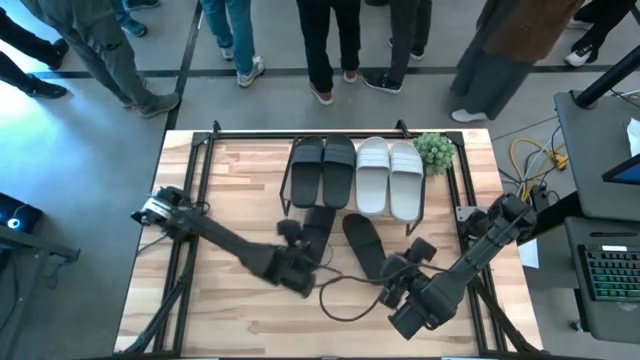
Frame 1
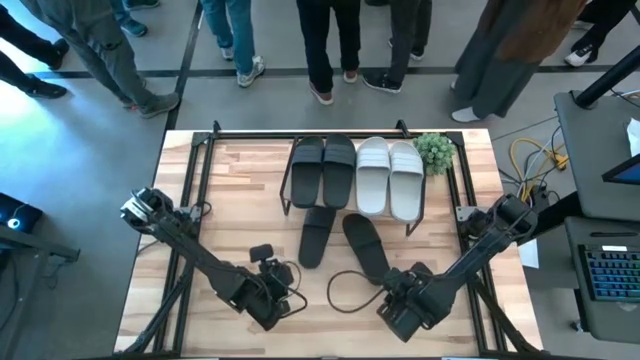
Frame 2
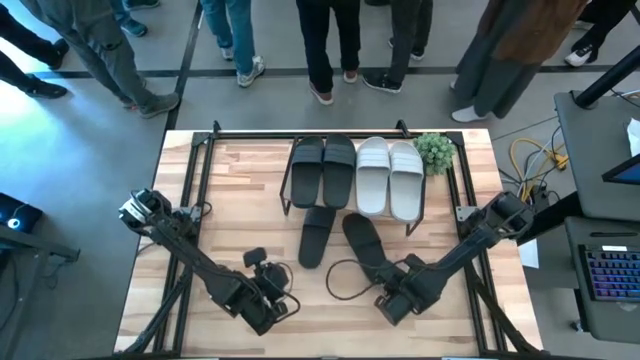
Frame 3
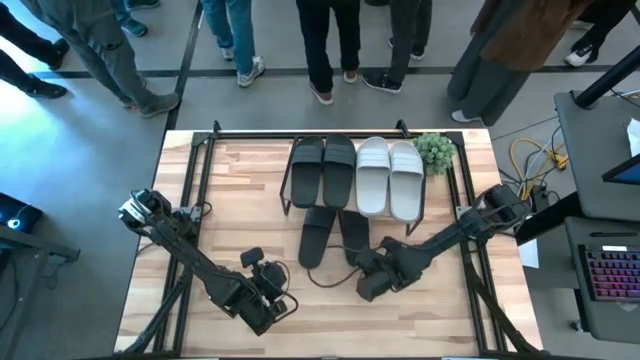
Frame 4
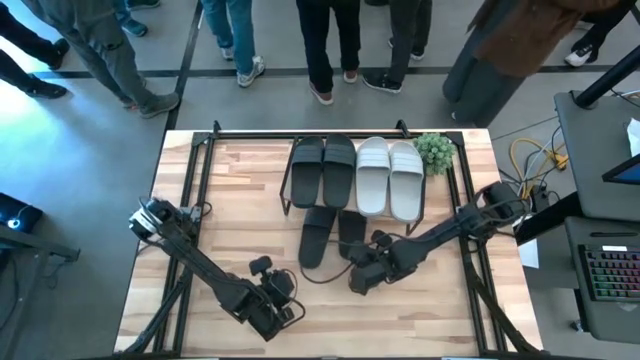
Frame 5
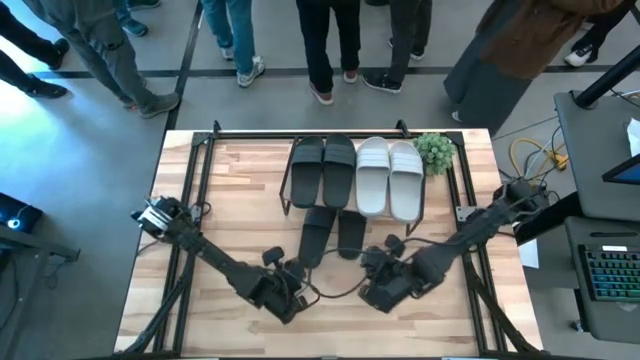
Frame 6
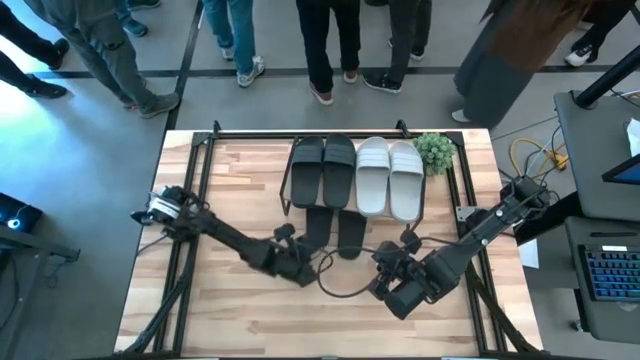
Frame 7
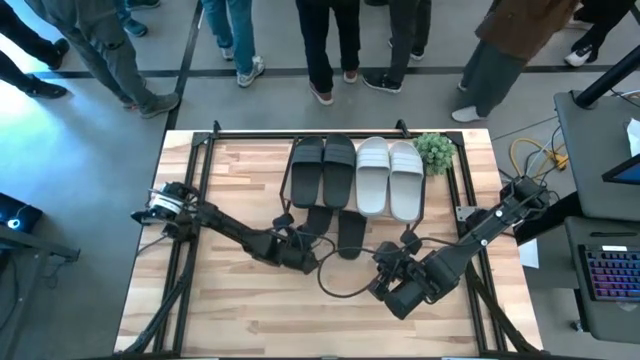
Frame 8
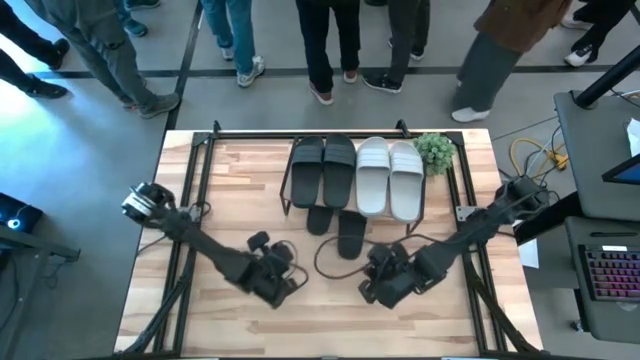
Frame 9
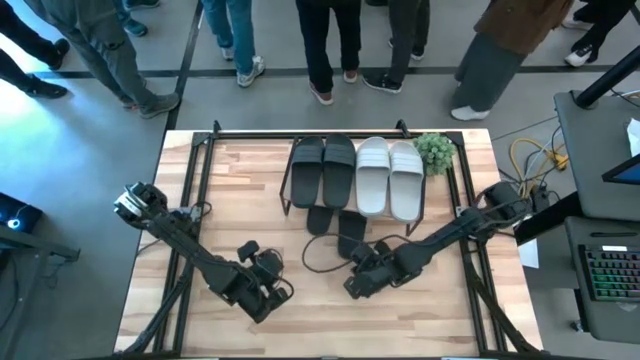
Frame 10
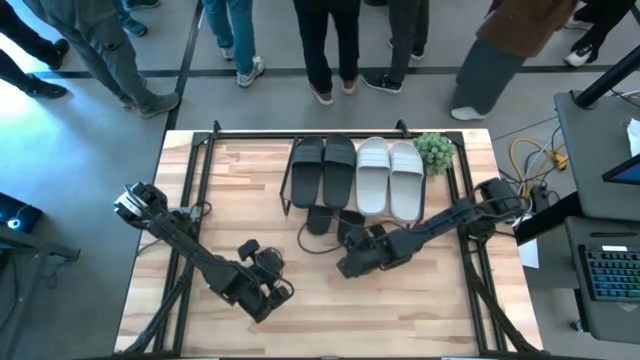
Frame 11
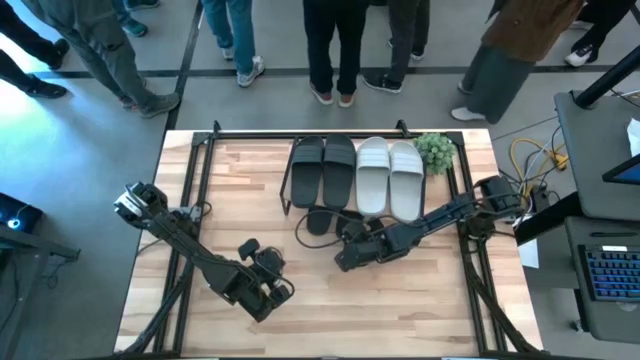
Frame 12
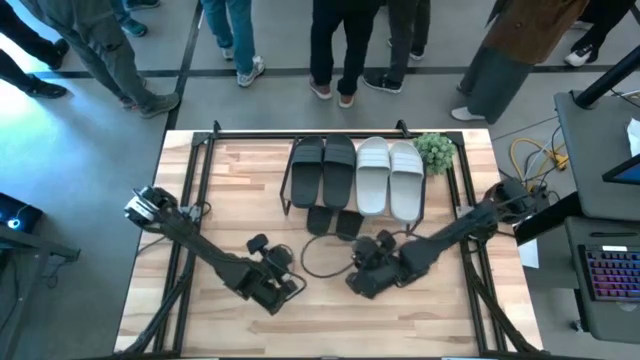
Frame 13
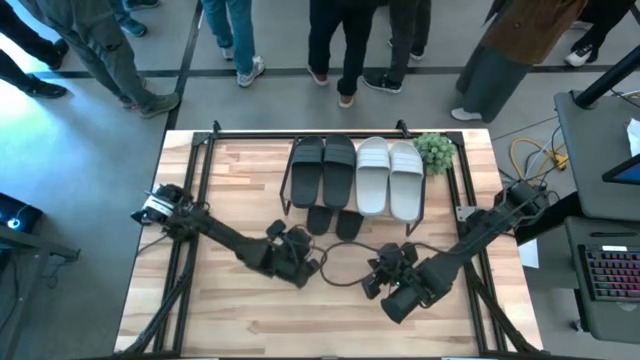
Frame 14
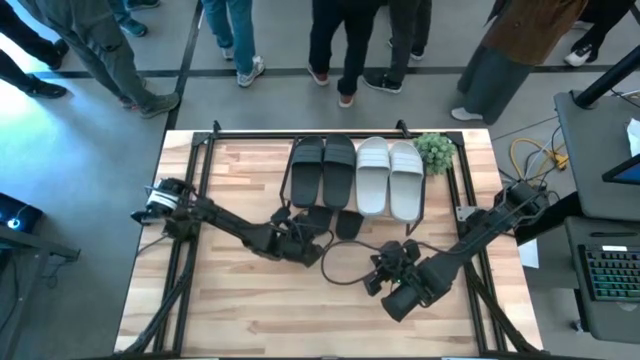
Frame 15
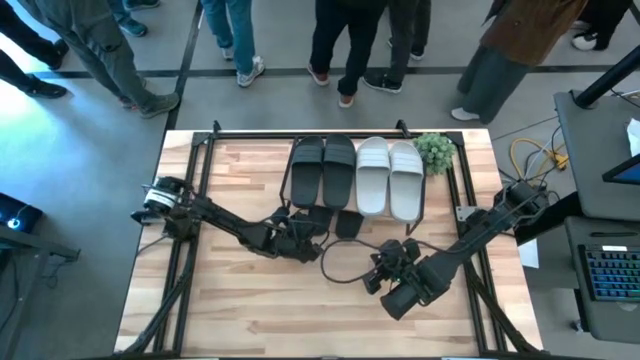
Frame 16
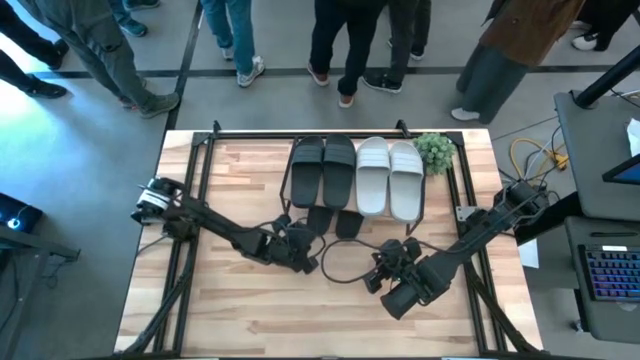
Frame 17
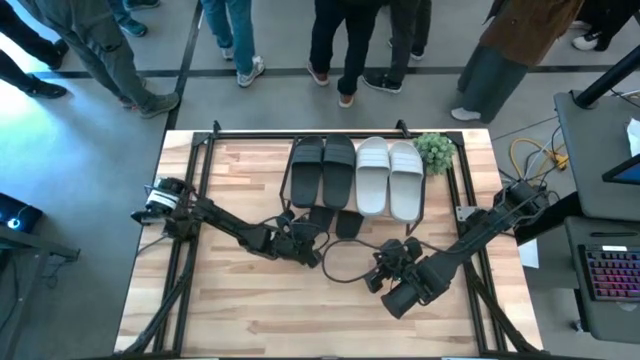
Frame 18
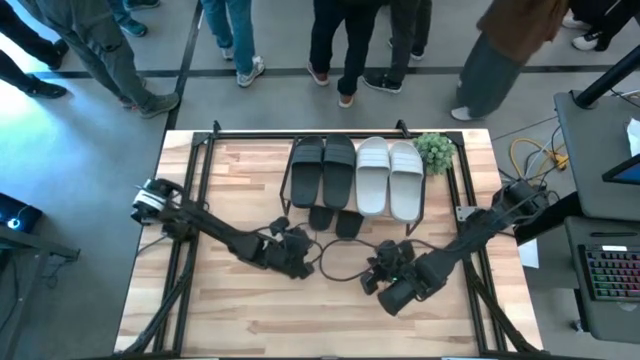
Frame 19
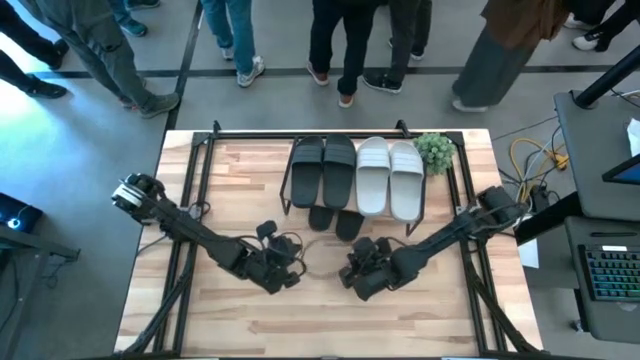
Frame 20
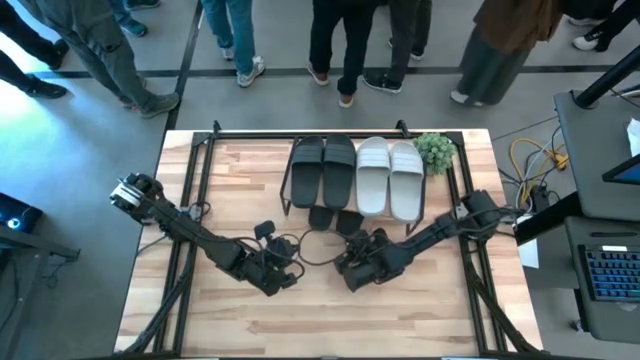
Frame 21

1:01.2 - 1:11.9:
Task: Pick and place slides into the shelf
Adjust the black slides under the shelf

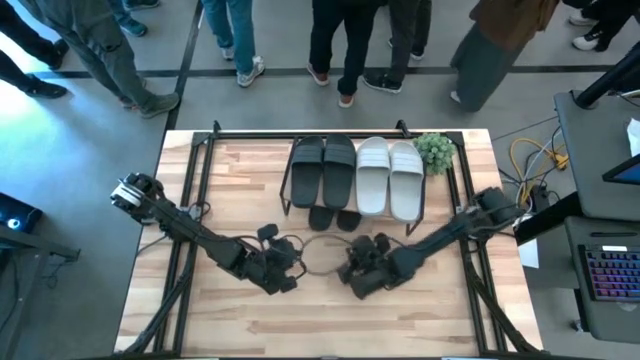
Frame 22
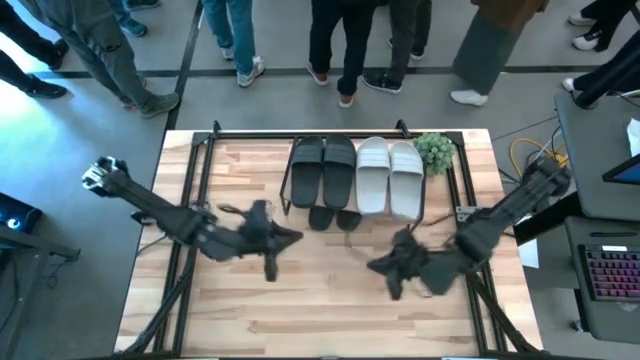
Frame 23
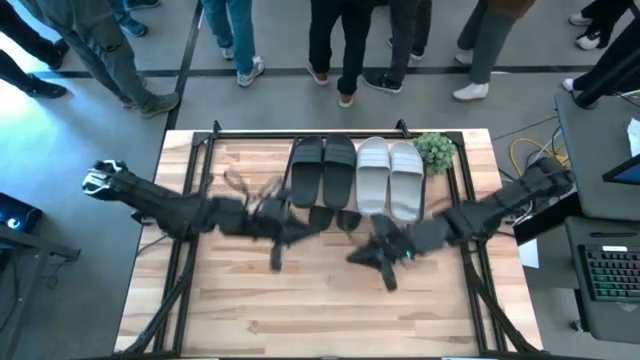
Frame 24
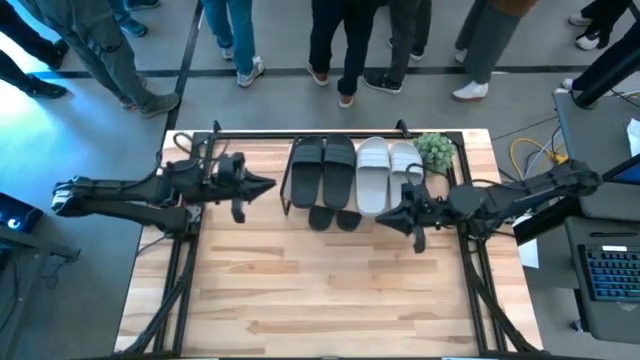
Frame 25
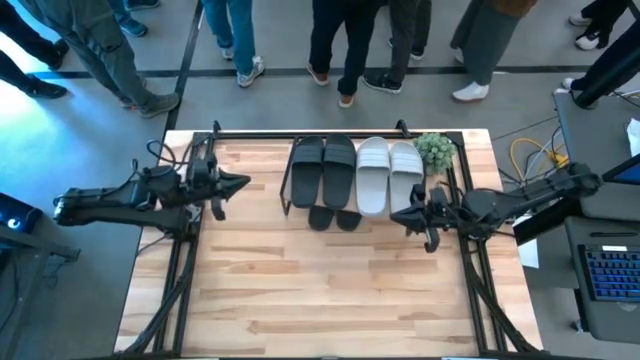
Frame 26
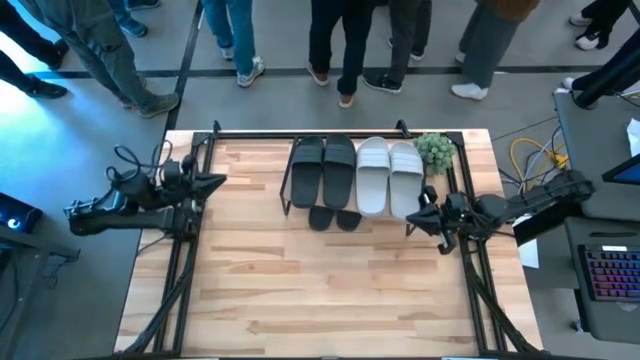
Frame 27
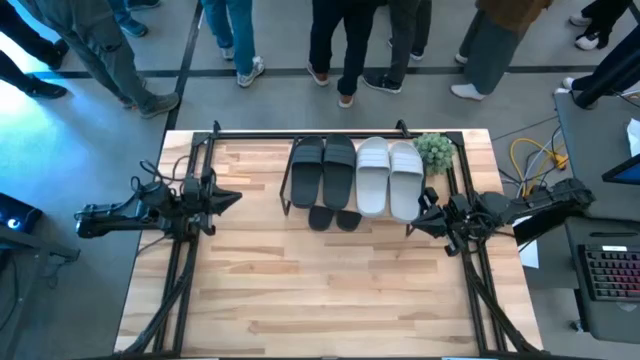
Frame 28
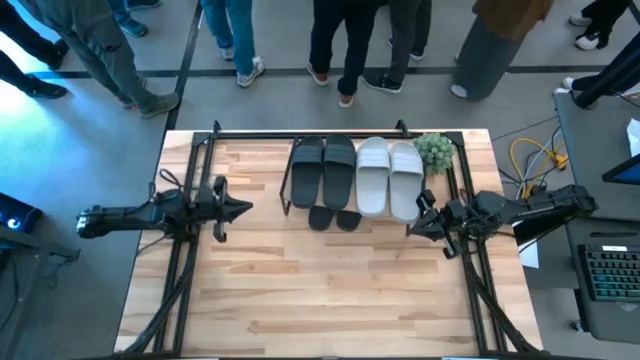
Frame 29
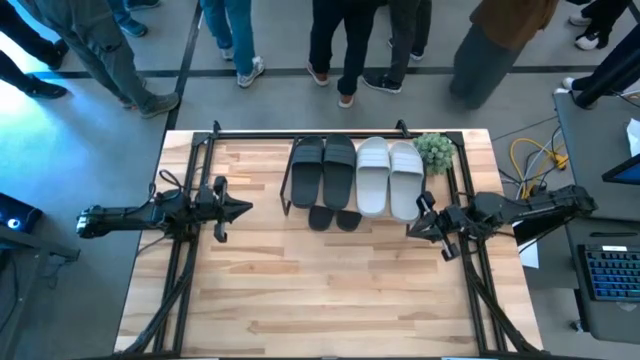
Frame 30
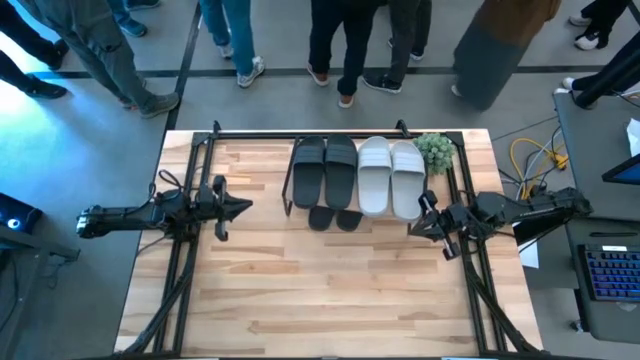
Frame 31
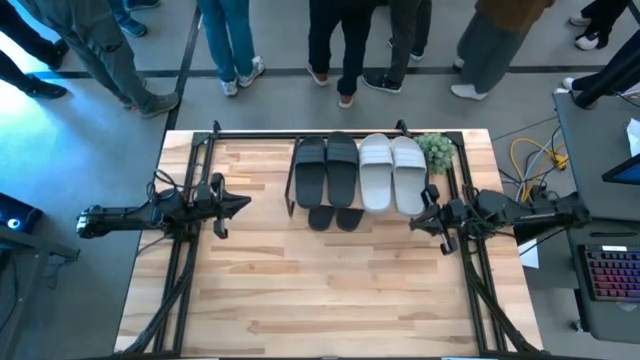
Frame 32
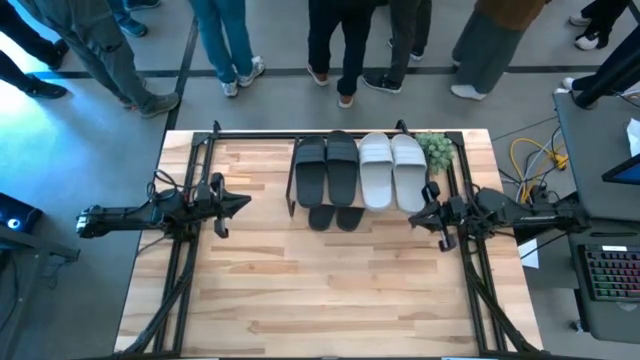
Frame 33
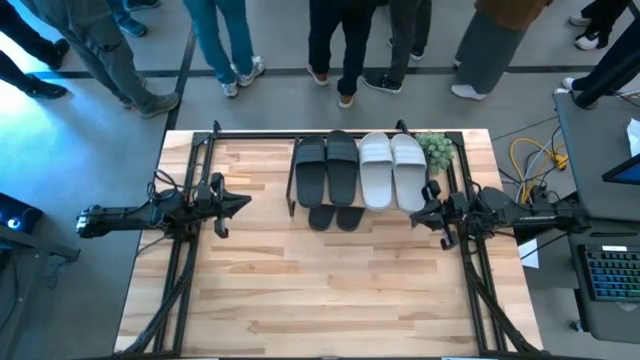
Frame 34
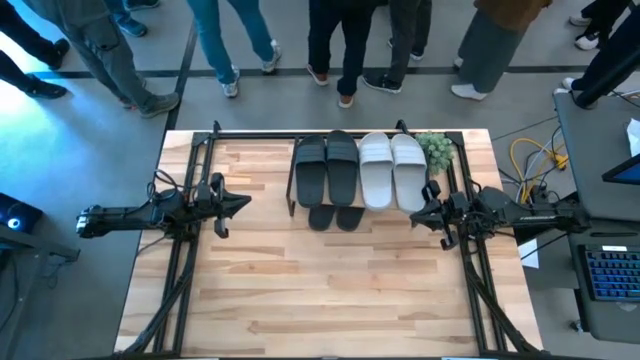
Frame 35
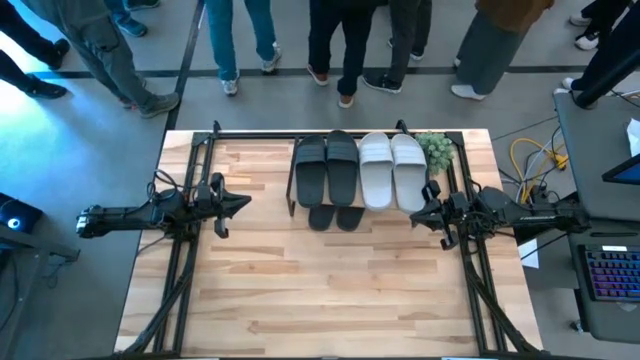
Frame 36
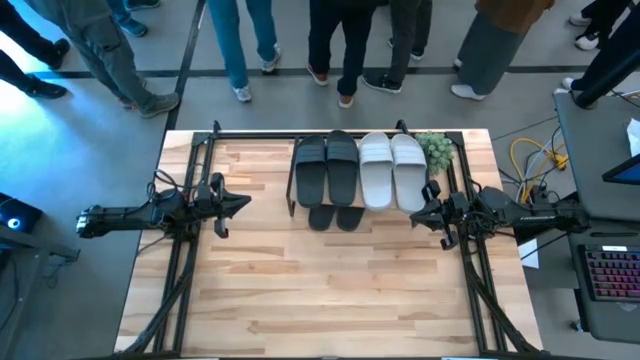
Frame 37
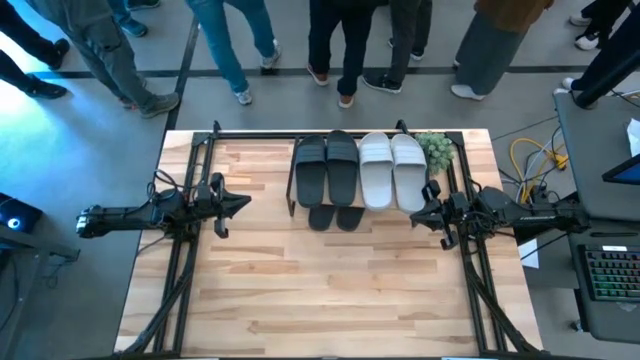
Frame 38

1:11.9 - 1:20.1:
Return to Home Position

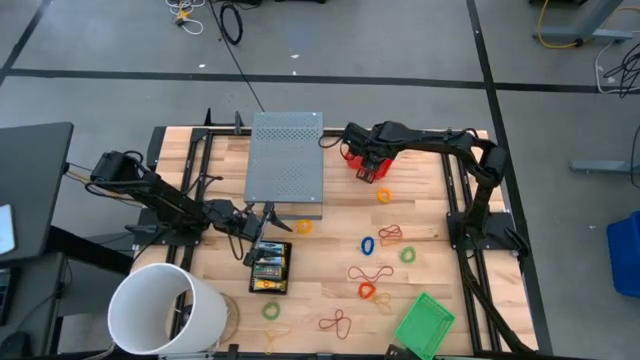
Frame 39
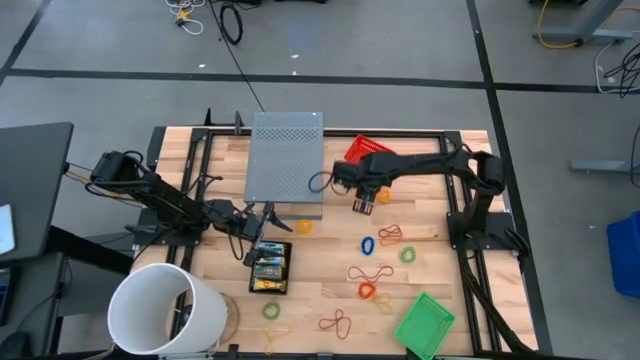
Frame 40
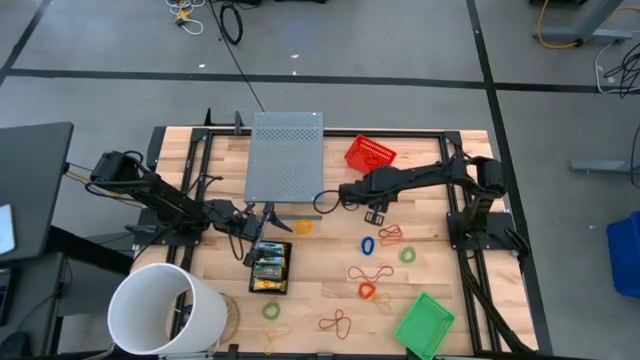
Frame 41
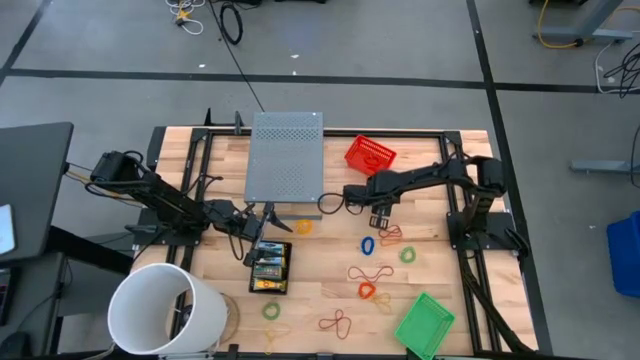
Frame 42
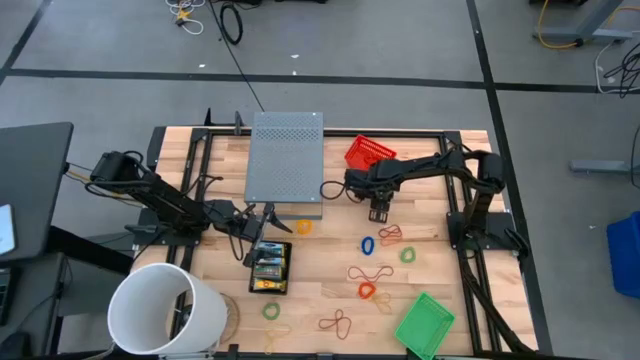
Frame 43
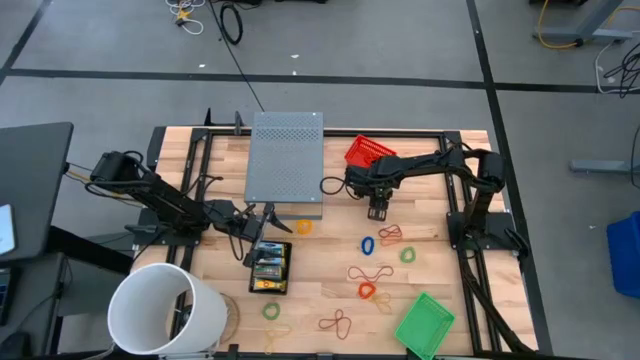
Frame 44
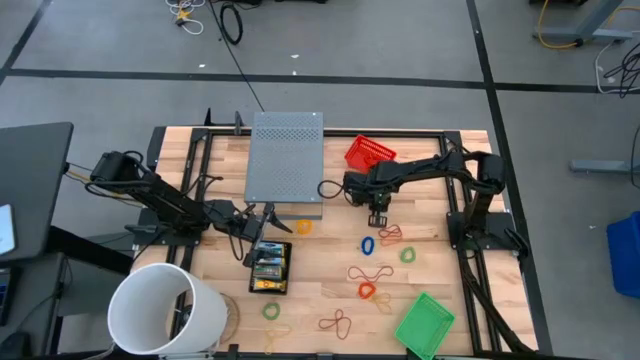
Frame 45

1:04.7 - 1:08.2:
Task: Pick & Place Office Desk Supplies
Put the top yellow spring keychain into the red basket
